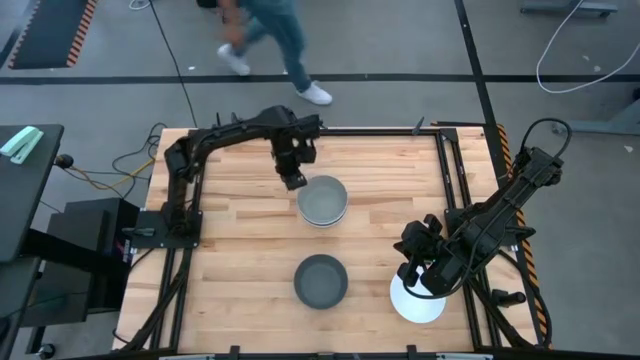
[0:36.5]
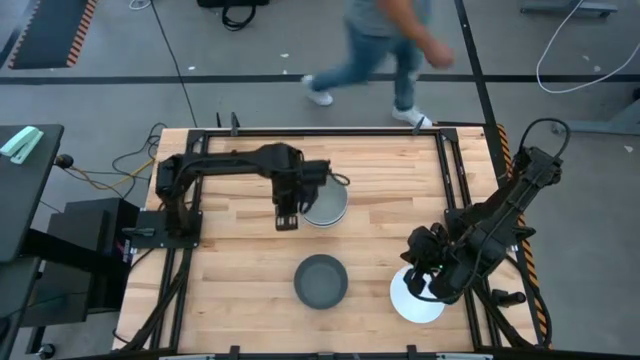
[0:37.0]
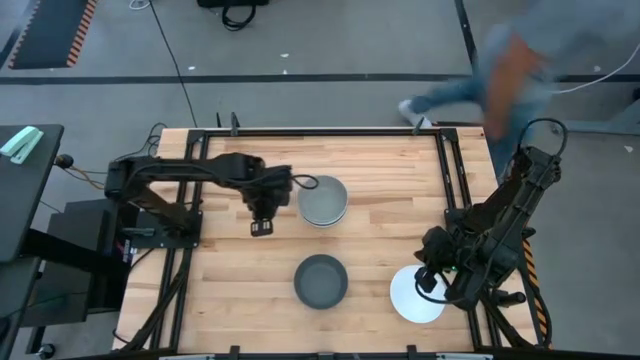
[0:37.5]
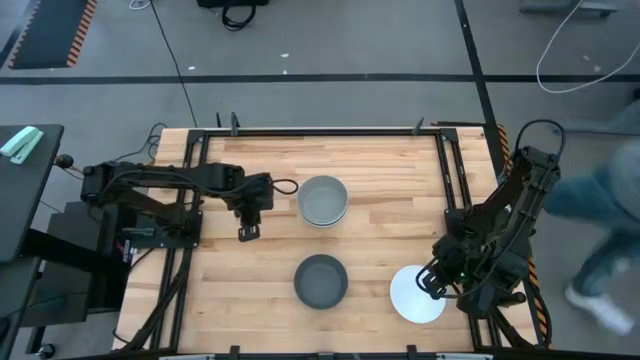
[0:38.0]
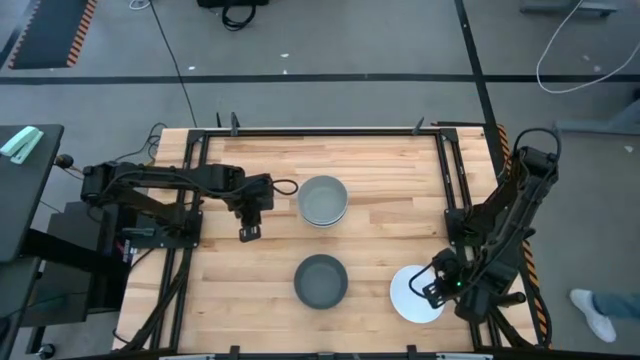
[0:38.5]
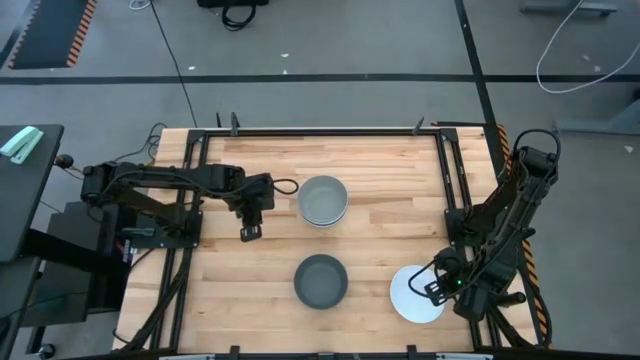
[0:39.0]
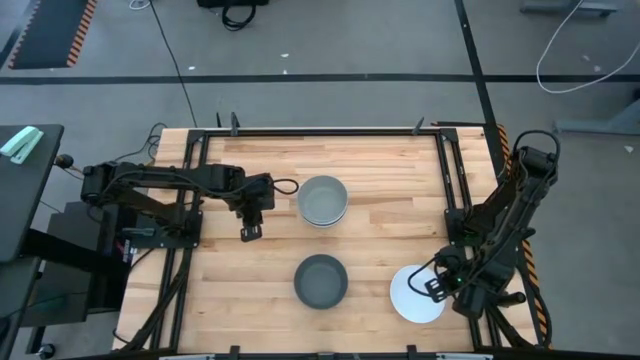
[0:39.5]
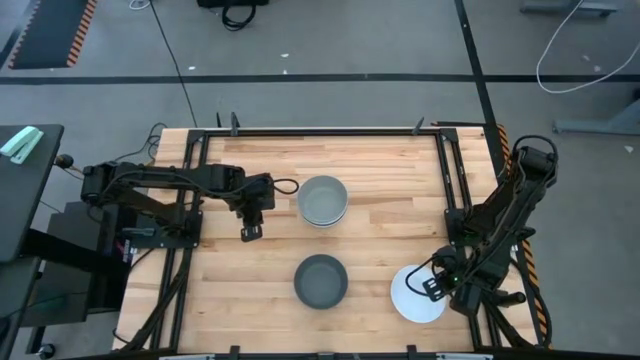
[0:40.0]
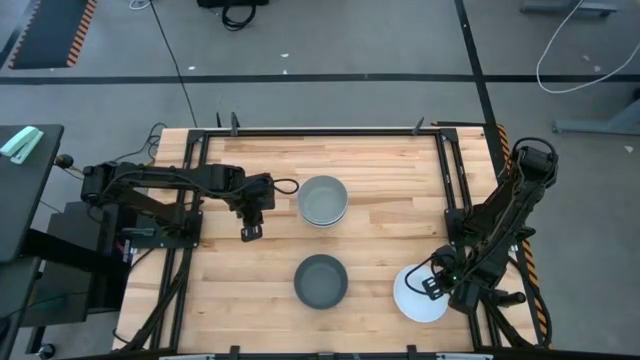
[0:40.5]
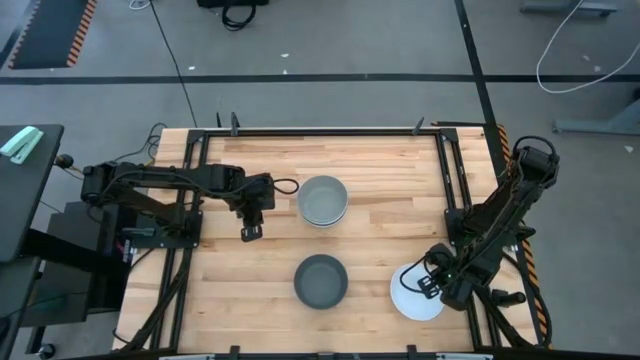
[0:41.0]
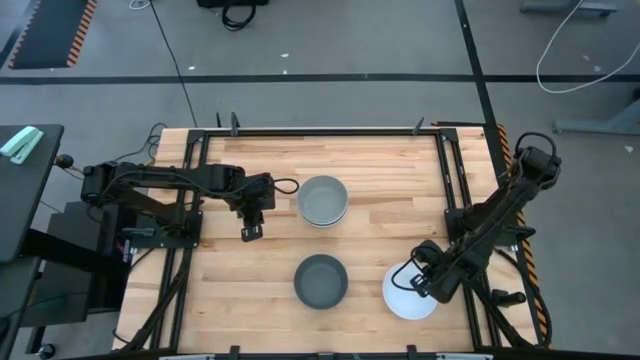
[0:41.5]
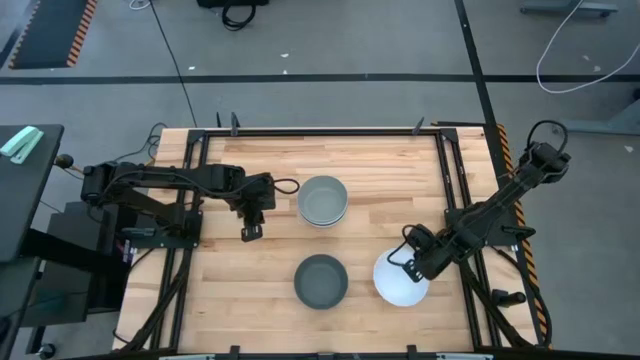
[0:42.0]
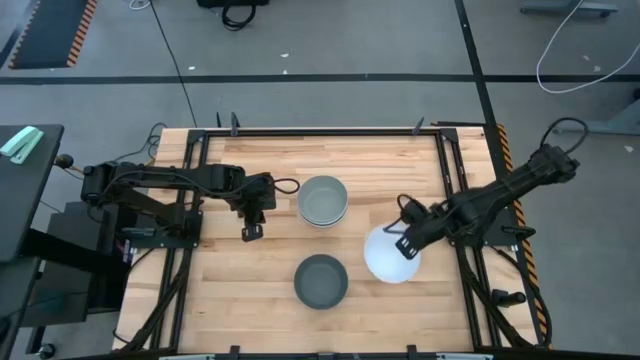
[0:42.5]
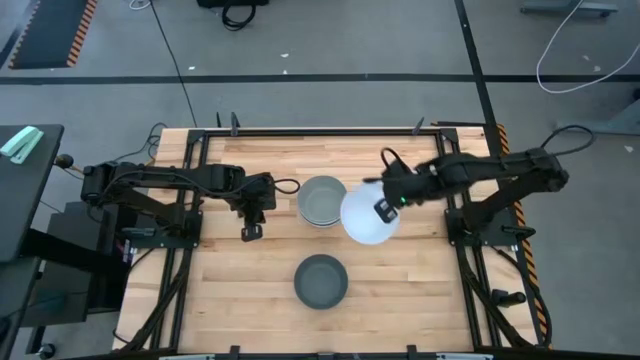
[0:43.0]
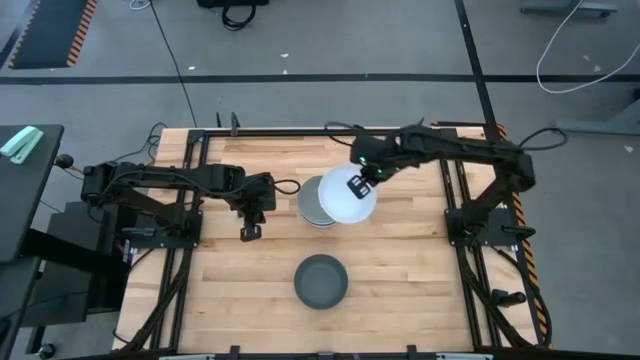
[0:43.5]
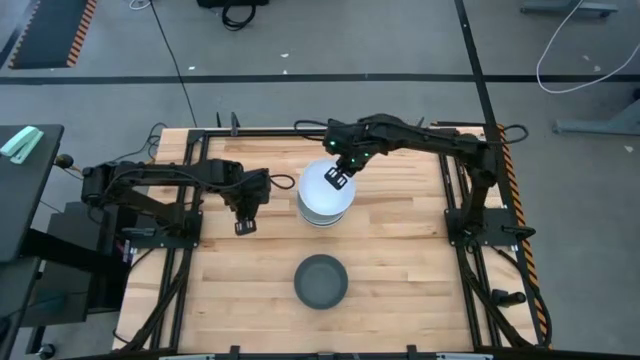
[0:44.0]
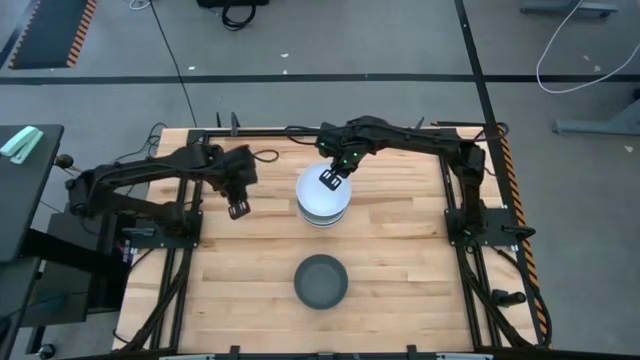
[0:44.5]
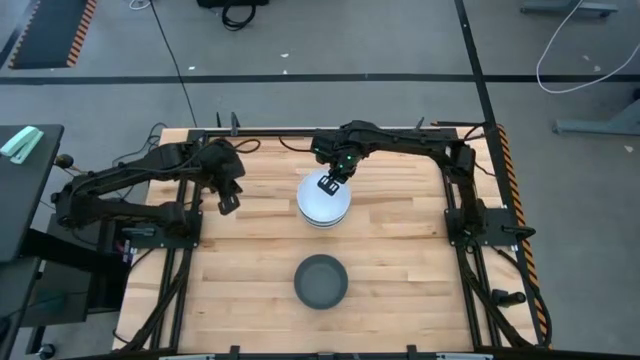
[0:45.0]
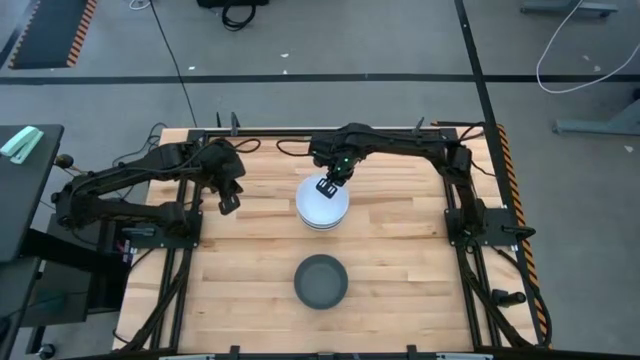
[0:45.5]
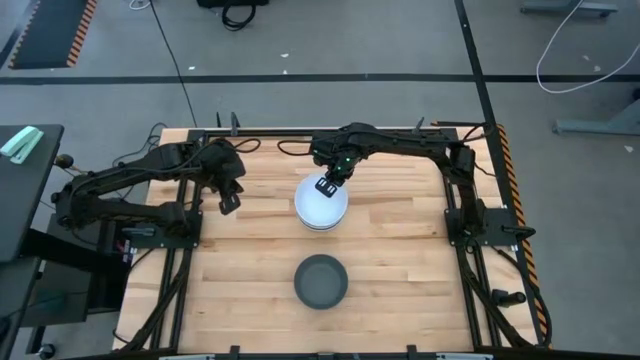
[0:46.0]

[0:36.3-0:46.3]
Task: Nest bowls inside each other
Stack the white bowl on the gray bowl

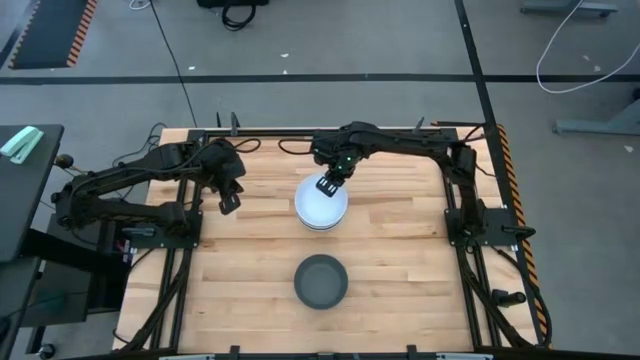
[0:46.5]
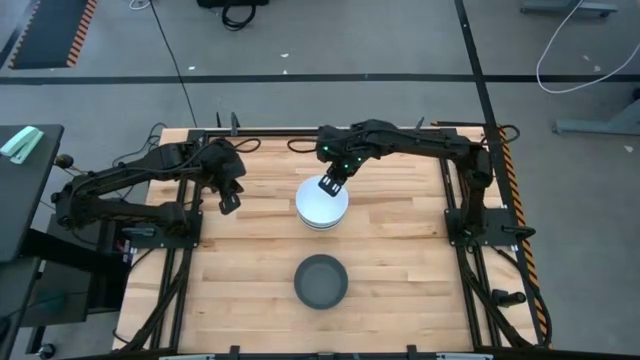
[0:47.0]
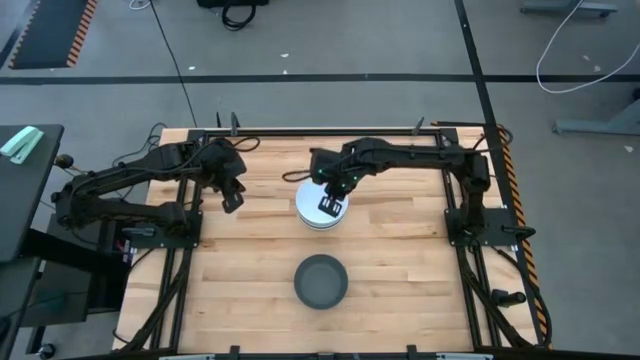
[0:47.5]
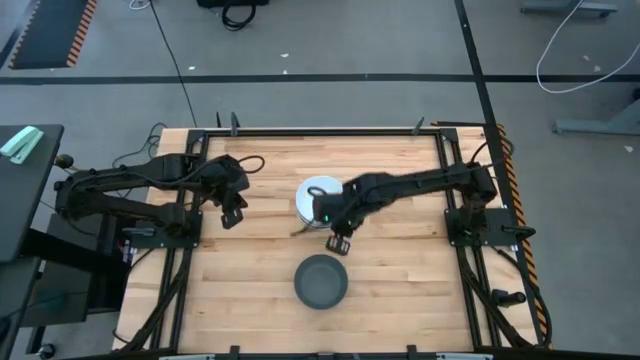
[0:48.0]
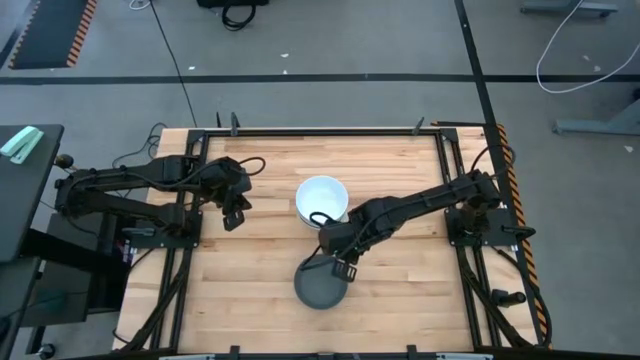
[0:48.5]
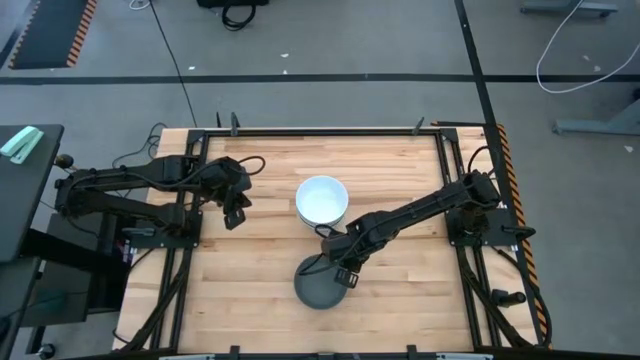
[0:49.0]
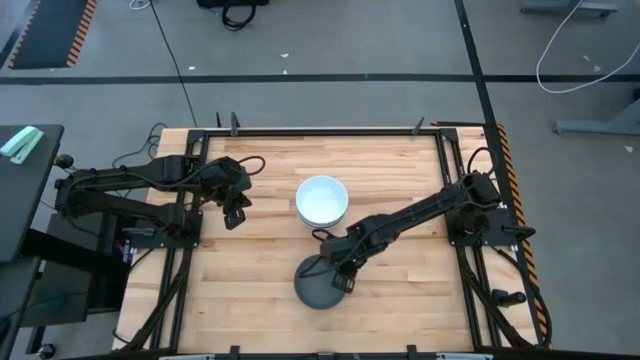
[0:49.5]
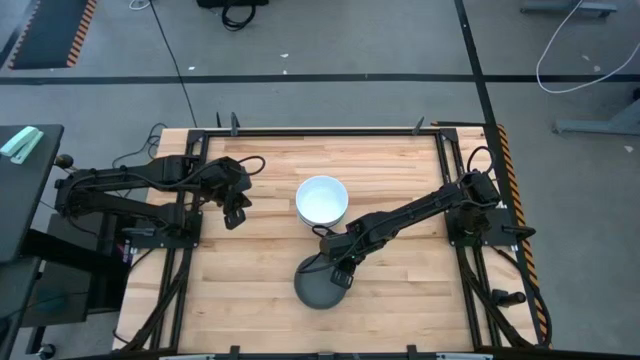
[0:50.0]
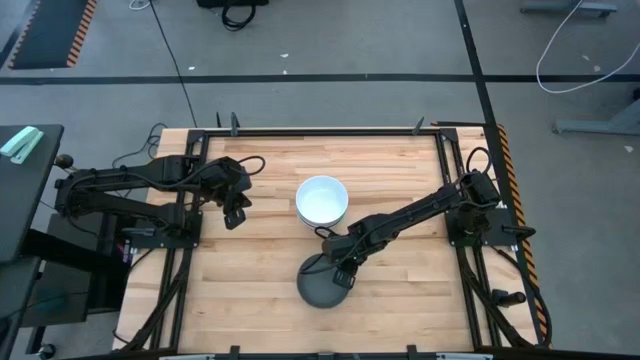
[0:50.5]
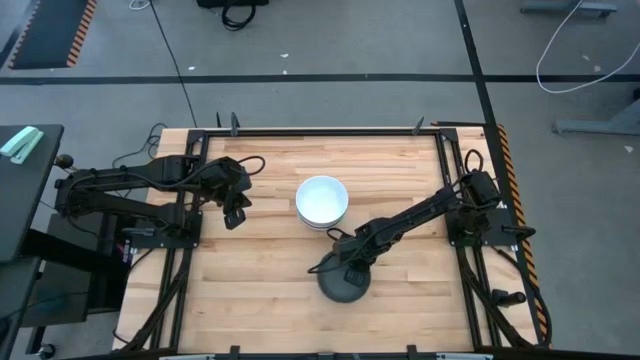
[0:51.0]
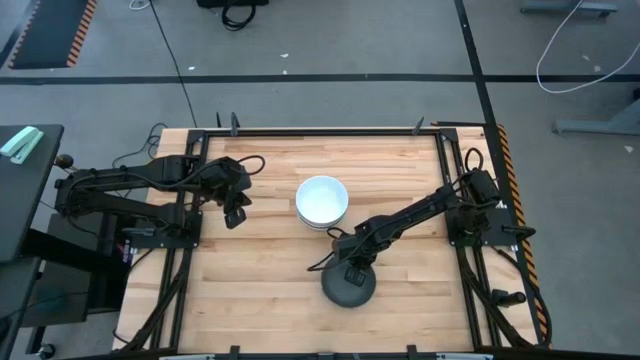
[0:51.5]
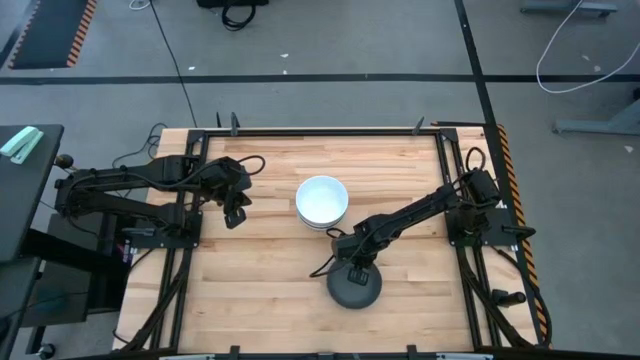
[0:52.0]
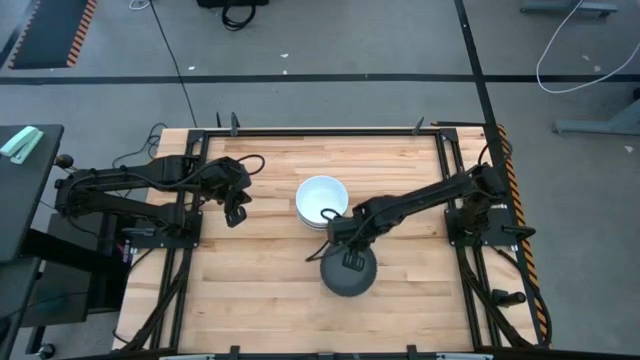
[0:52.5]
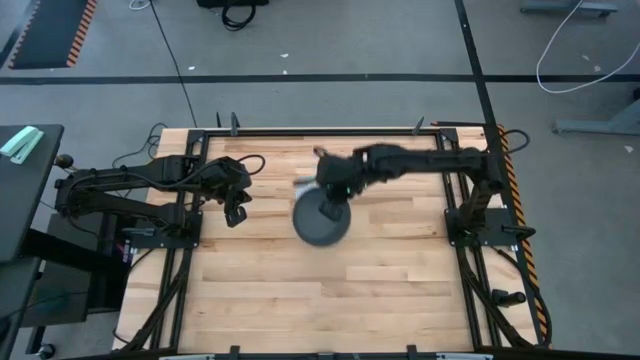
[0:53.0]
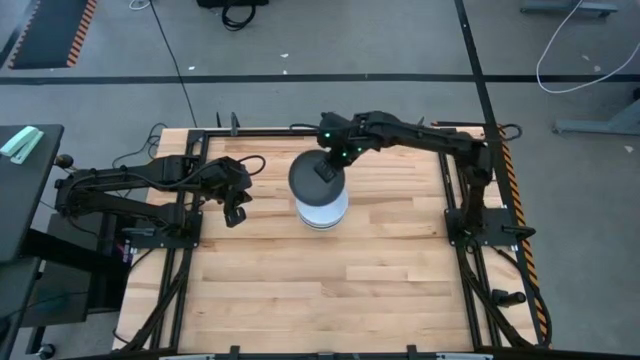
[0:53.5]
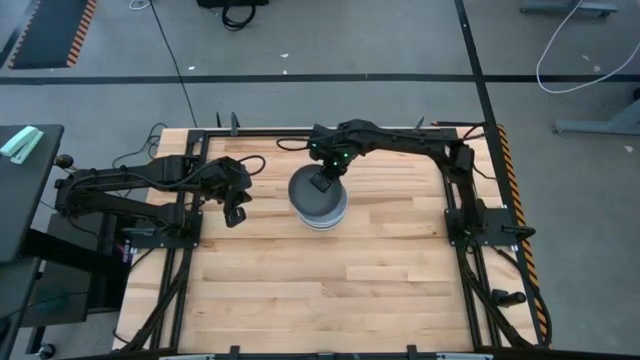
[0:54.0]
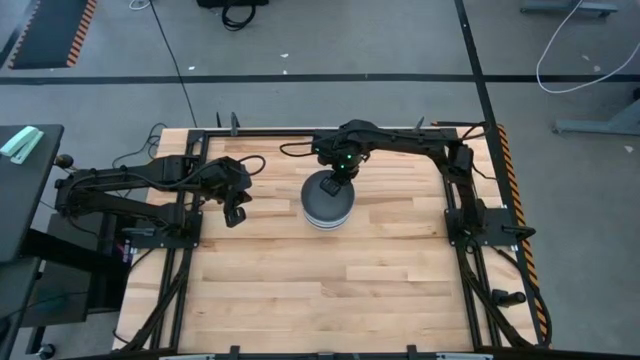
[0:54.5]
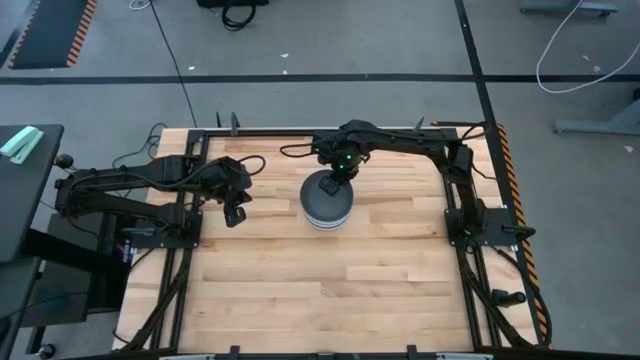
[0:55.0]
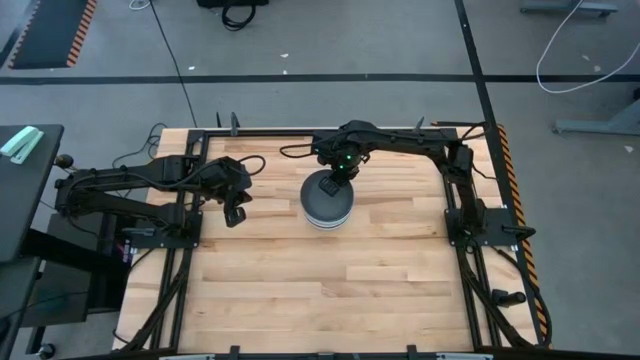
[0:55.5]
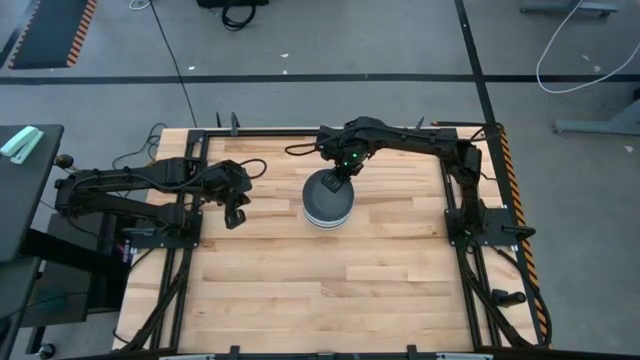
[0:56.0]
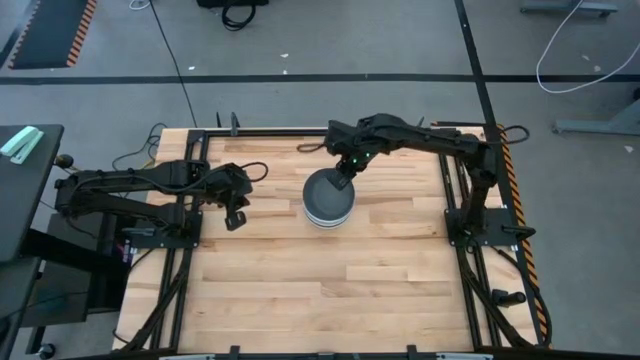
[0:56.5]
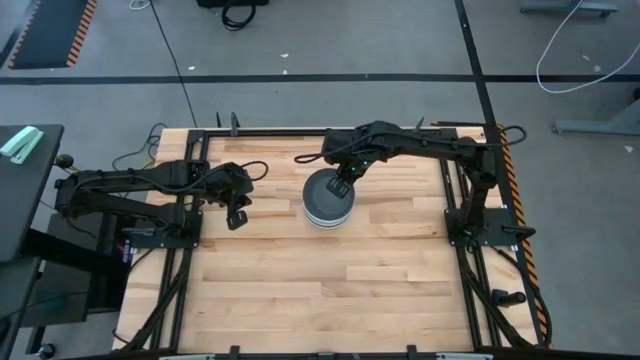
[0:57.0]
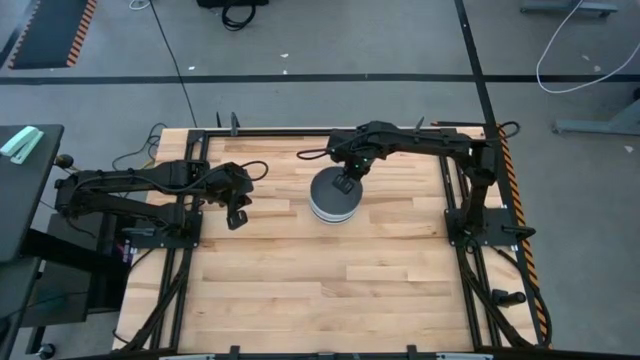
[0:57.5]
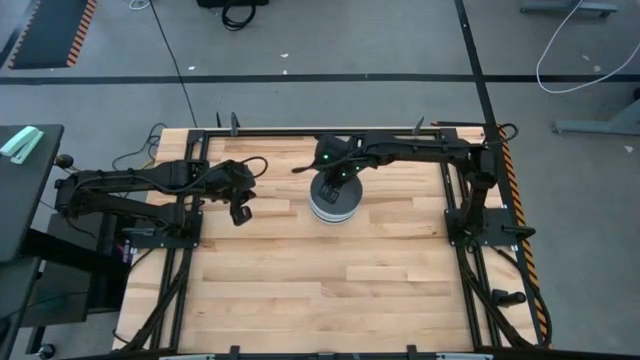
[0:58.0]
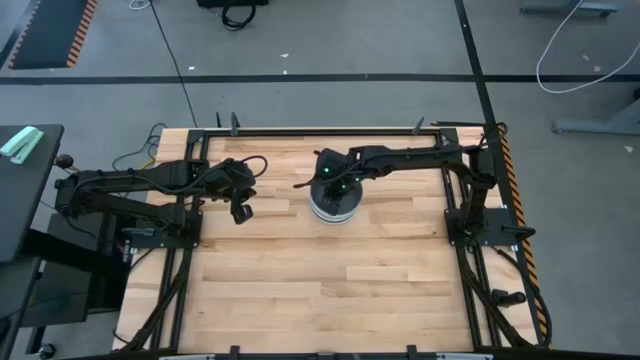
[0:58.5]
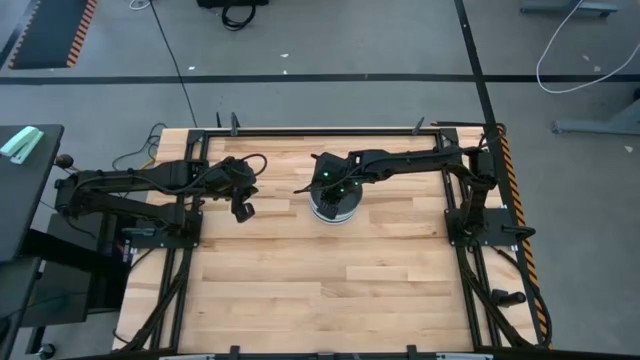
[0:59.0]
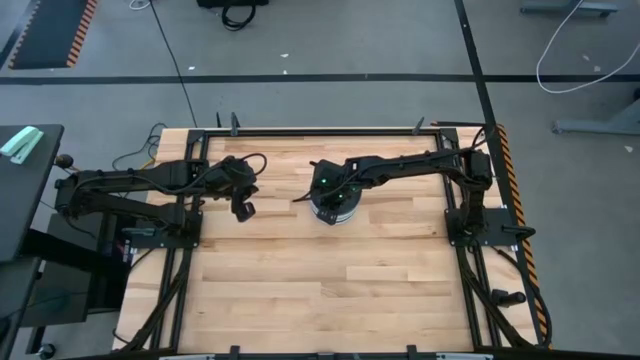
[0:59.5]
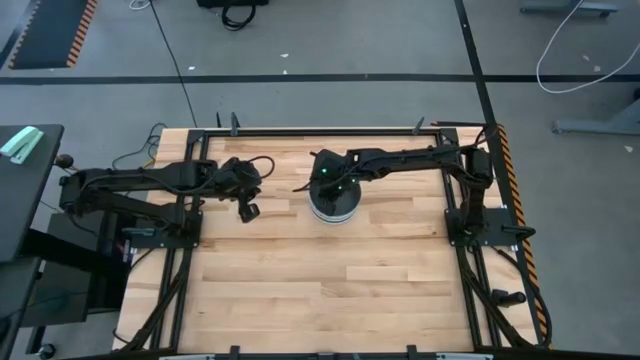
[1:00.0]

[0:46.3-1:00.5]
Stack the dark gray bowl on the gray bowl
